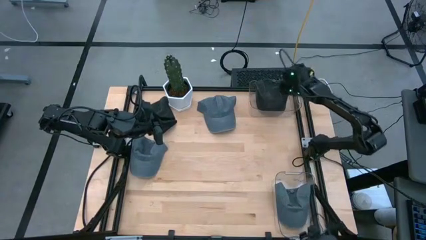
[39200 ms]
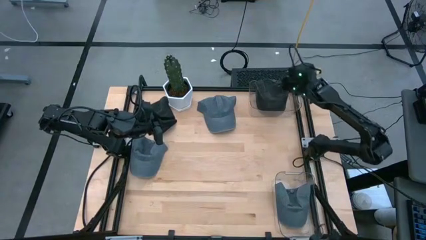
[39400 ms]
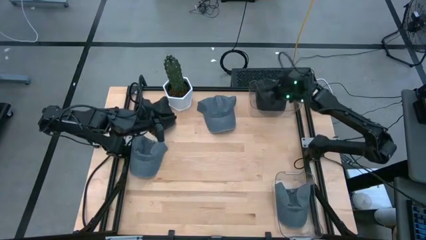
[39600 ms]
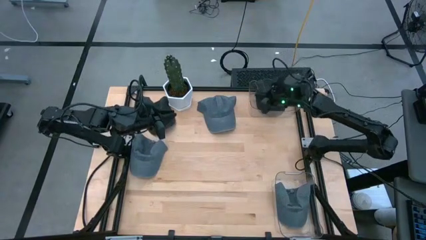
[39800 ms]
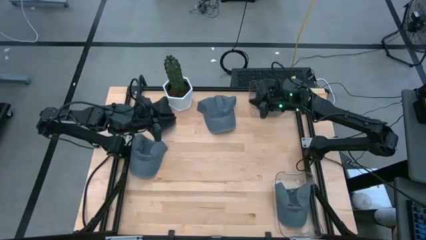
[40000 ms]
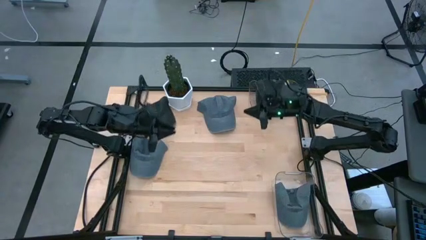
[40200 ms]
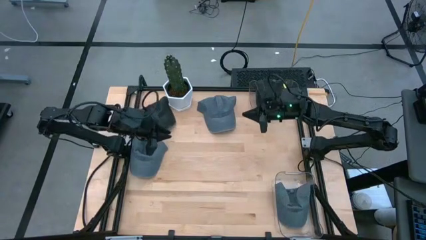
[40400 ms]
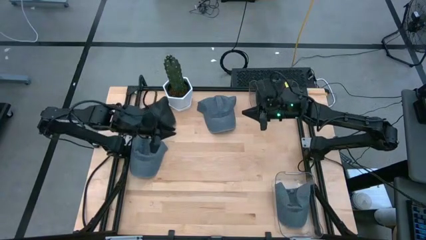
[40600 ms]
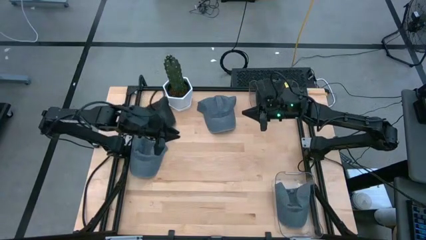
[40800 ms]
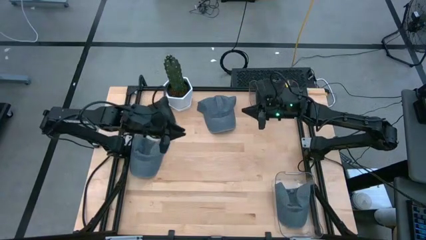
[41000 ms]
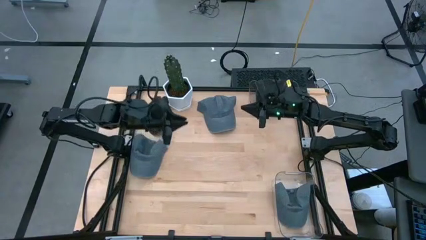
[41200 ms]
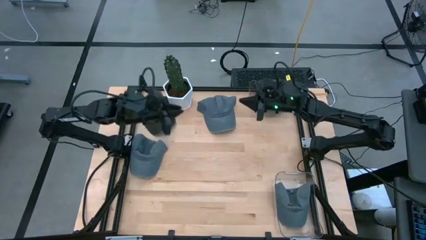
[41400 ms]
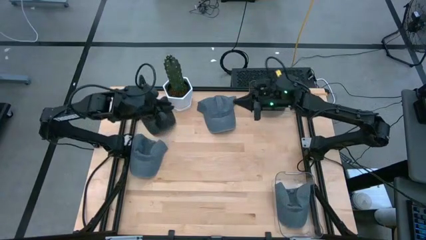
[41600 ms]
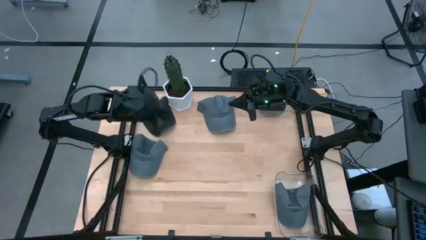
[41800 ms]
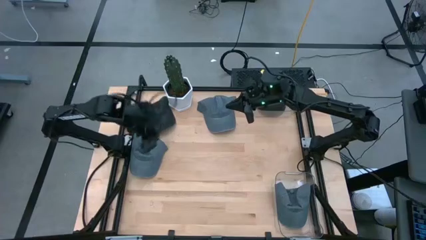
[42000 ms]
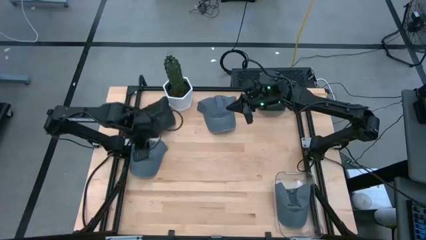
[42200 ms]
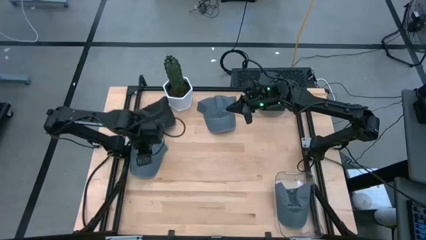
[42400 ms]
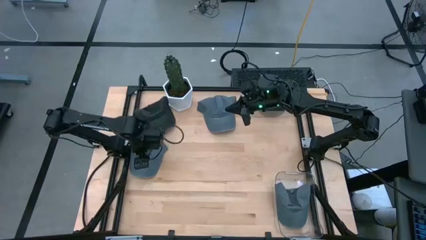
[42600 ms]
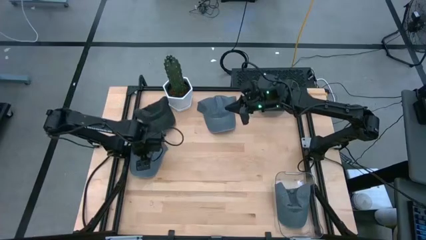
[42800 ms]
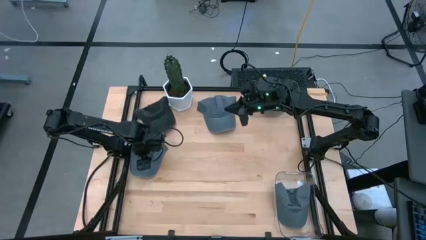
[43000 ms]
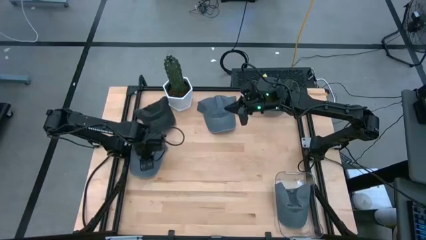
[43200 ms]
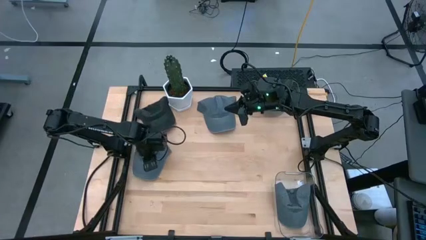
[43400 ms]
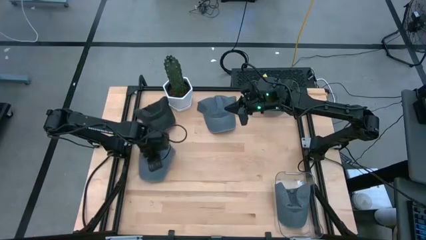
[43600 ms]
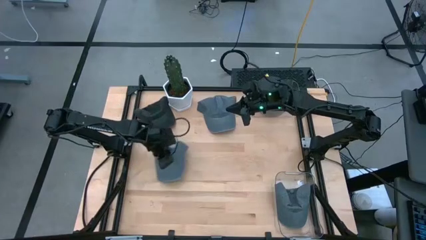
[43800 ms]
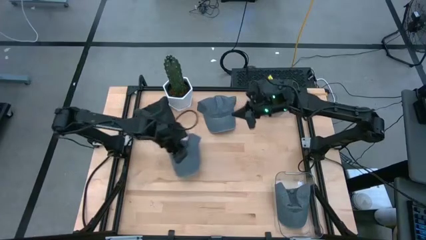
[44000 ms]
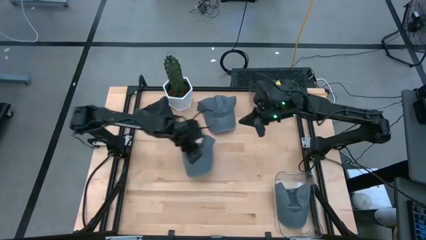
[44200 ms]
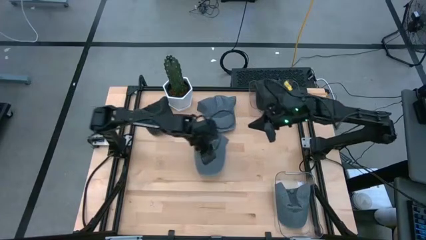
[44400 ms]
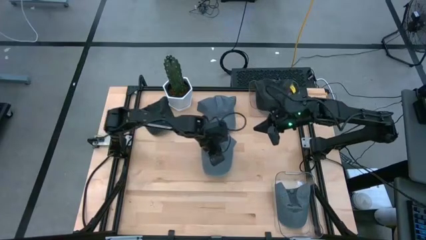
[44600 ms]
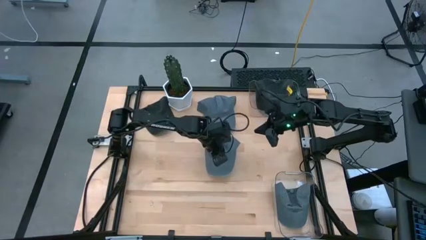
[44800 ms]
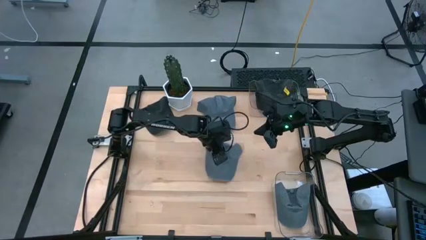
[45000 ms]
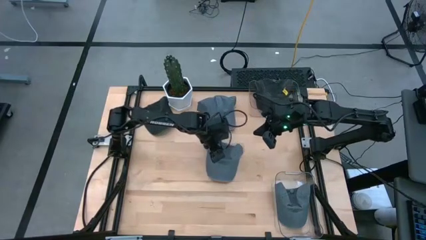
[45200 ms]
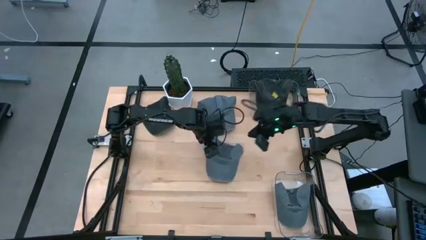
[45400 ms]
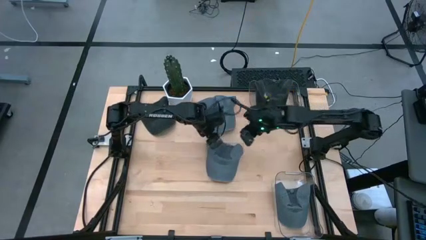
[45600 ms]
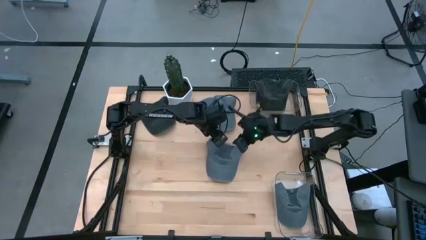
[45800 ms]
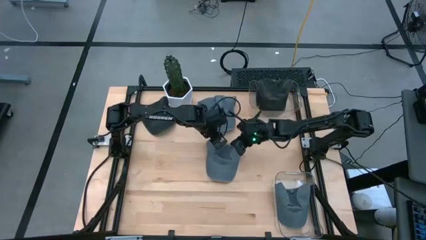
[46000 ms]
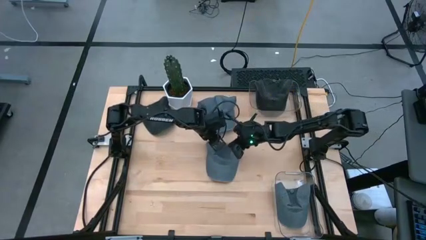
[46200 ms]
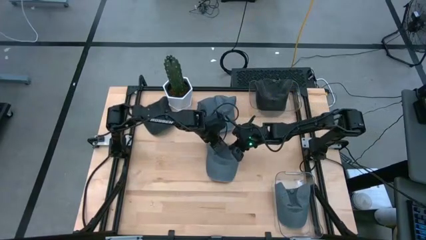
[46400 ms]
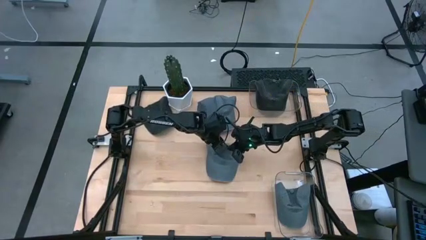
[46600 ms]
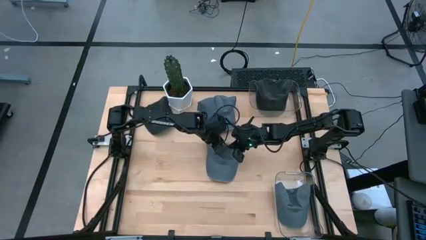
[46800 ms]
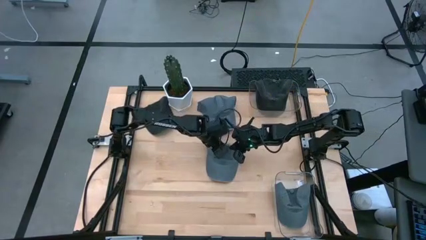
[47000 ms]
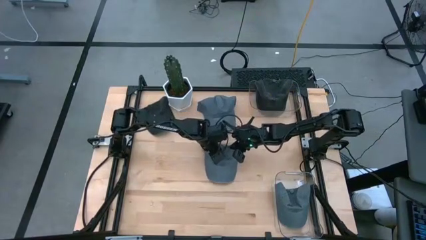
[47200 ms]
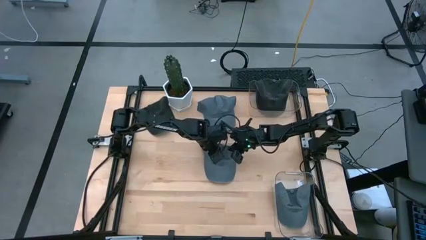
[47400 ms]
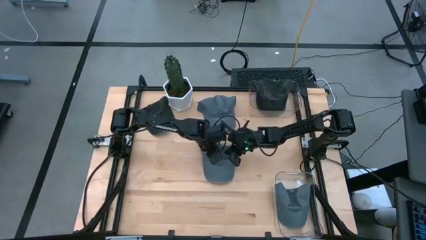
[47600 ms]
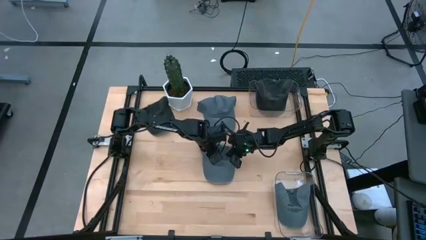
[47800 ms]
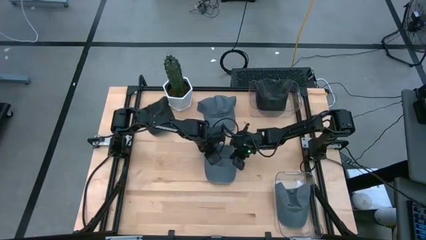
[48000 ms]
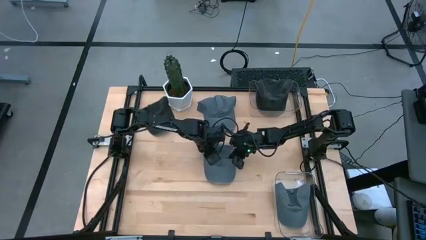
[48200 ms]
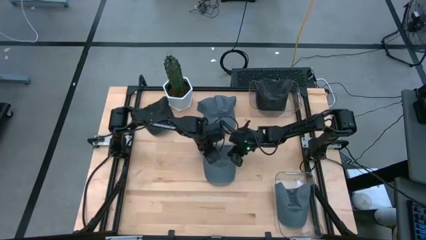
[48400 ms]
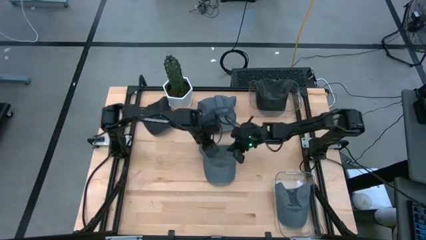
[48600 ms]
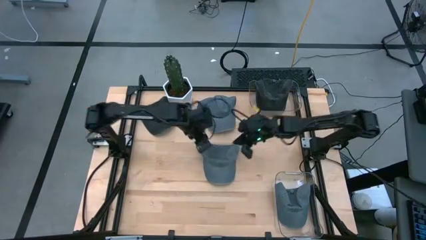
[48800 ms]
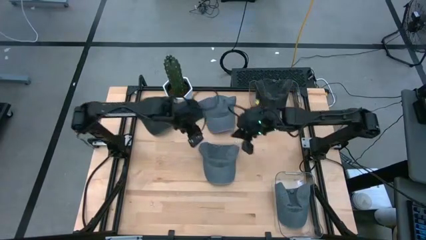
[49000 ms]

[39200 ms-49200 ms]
Task: Pick & Place hat
Put the bottom gray cap into the bottom transparent bin

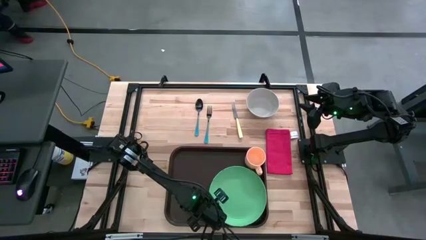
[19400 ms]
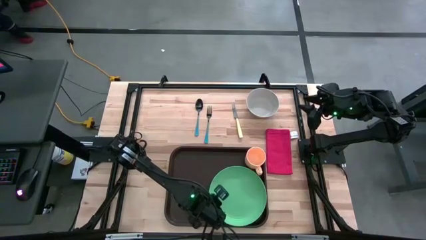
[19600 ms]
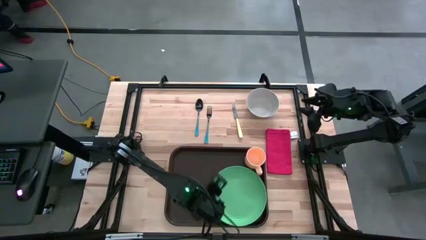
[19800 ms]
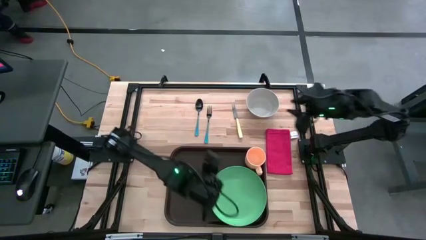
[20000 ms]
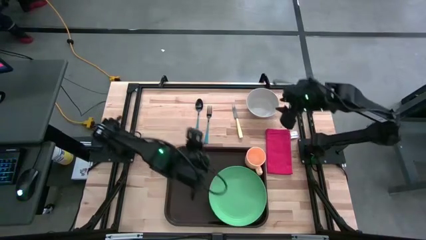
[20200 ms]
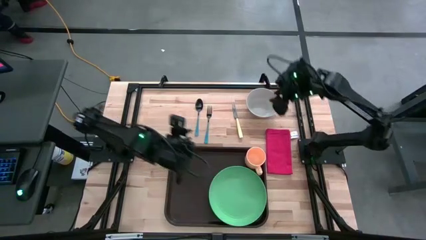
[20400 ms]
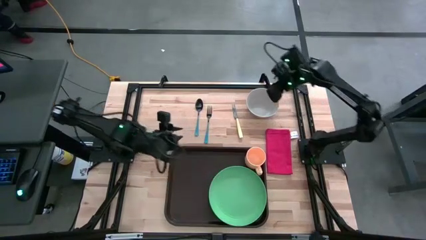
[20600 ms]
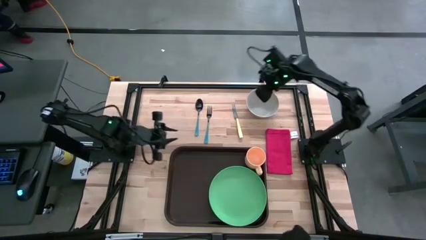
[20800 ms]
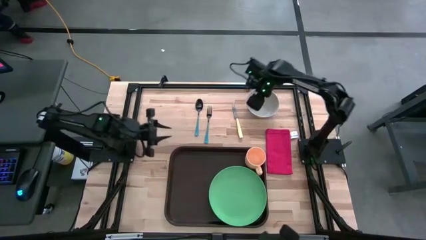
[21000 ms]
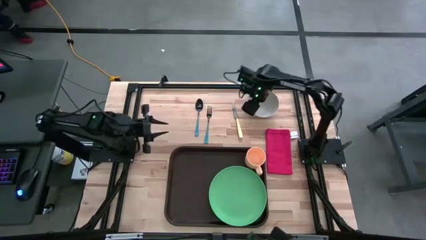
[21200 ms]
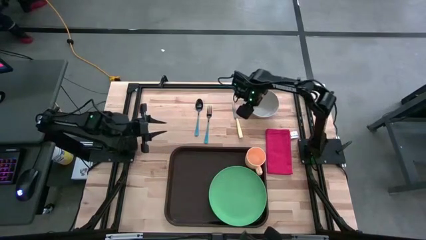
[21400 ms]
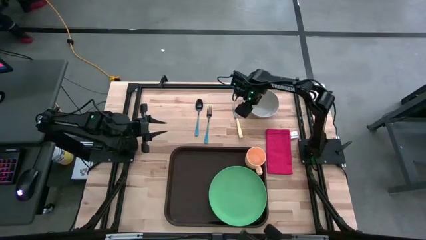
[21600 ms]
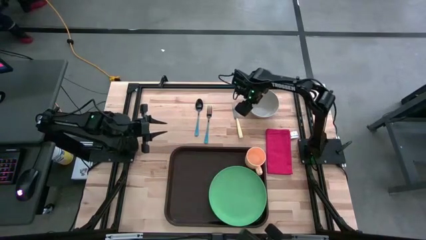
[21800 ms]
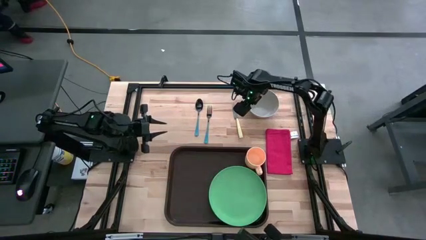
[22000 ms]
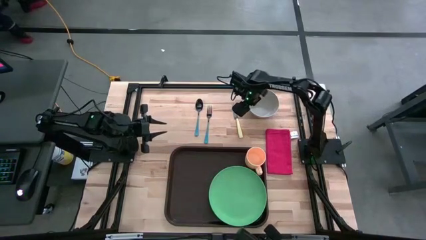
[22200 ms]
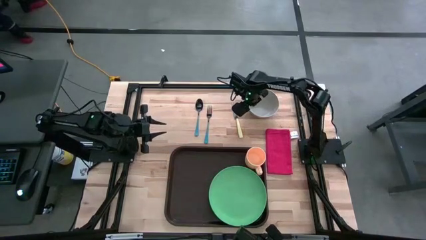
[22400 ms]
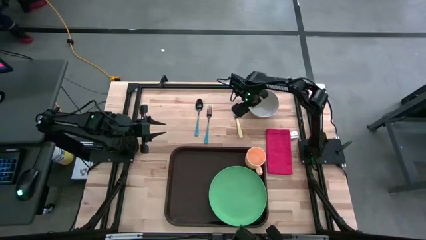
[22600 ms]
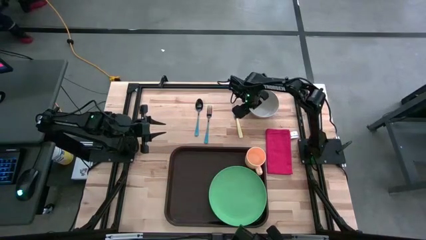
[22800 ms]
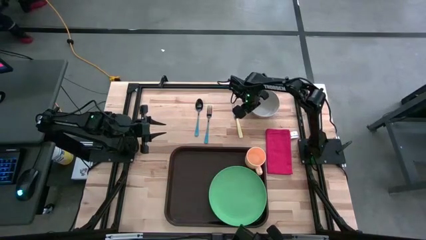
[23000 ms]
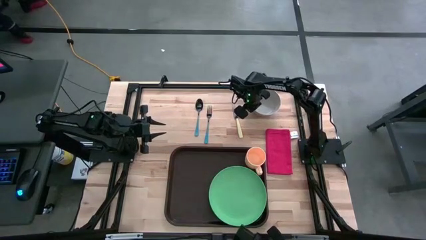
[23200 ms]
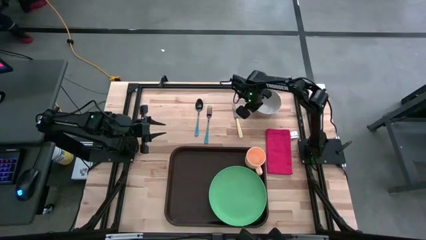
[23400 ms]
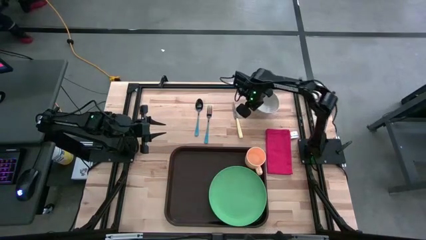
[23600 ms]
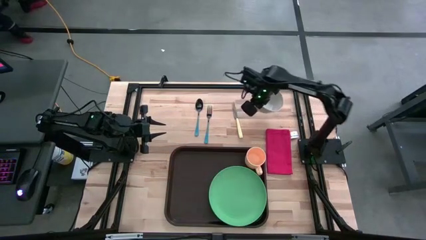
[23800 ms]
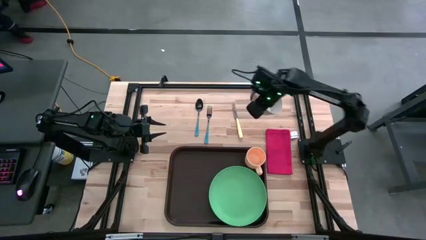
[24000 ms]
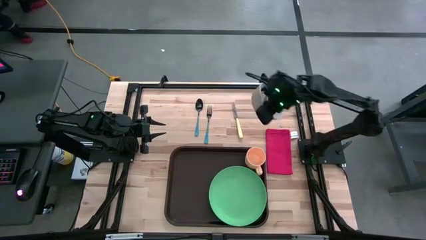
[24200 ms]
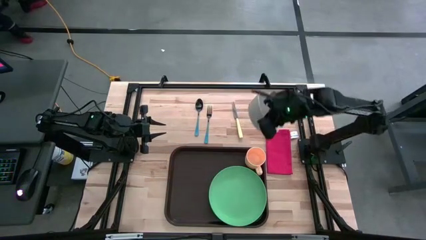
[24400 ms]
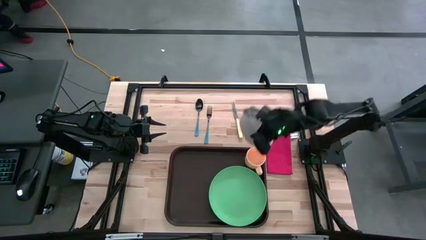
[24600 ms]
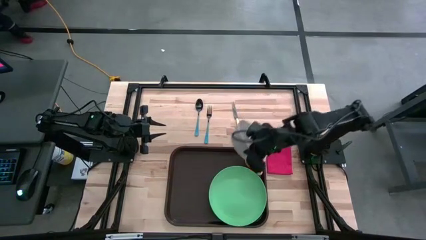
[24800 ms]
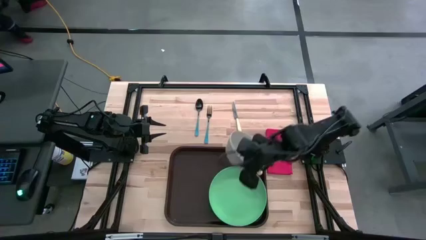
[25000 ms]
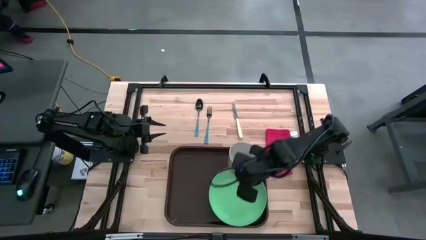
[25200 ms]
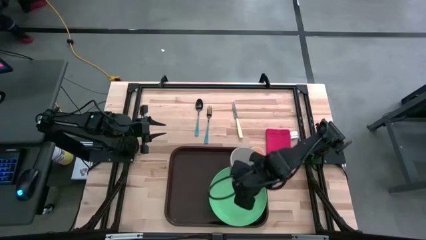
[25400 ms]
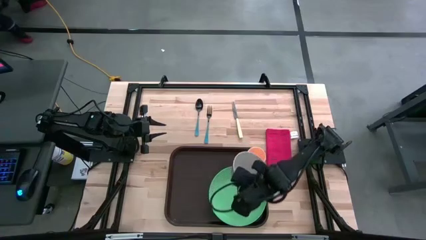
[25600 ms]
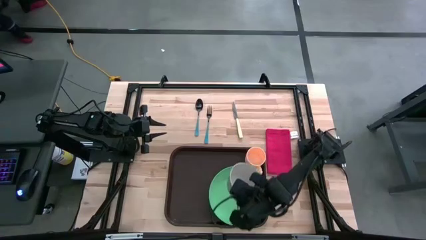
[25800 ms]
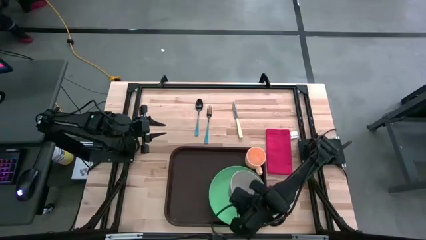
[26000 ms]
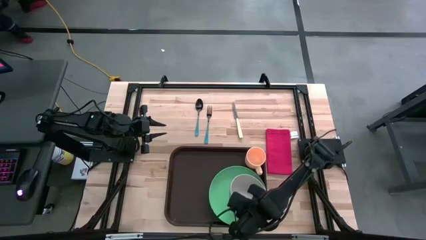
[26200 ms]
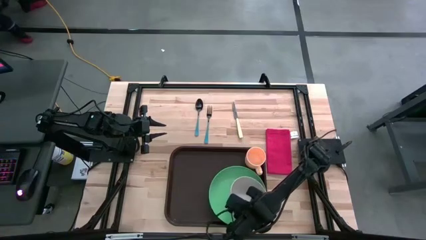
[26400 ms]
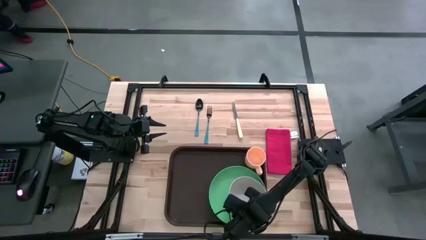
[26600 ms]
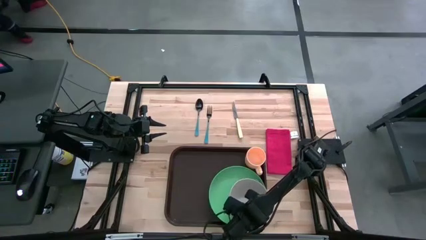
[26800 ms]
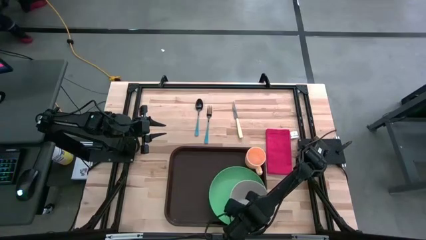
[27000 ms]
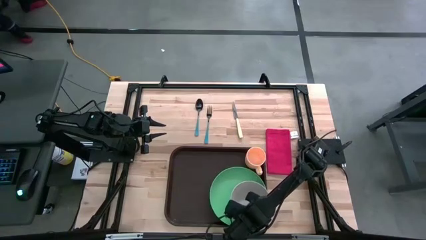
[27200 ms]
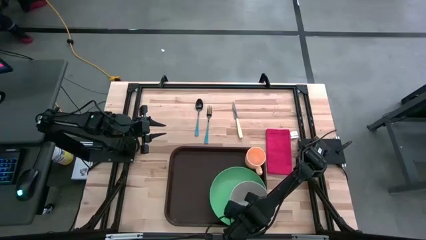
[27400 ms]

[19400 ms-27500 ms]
Task: Set up tray
Put the gray bowl on top of the green plate
